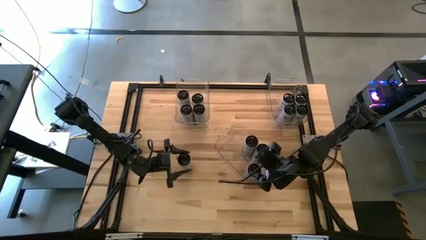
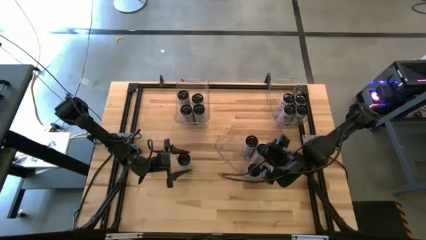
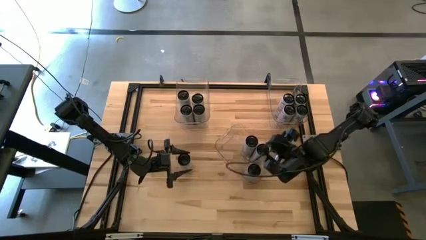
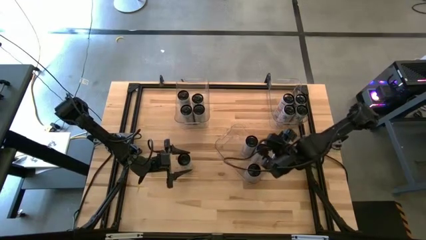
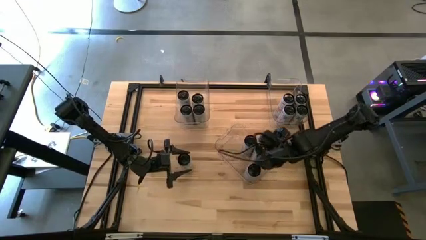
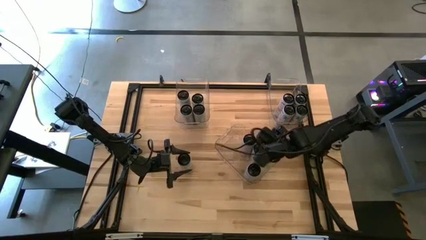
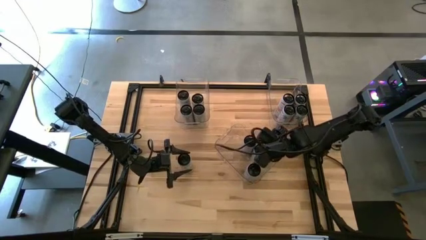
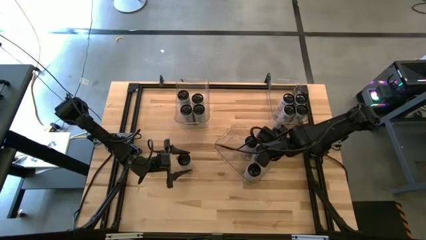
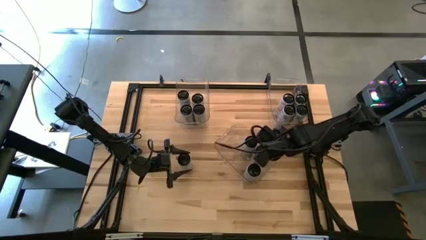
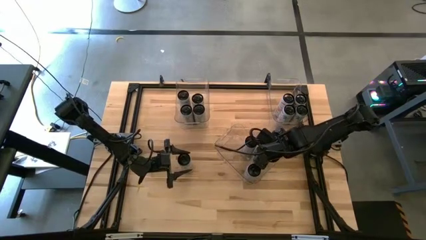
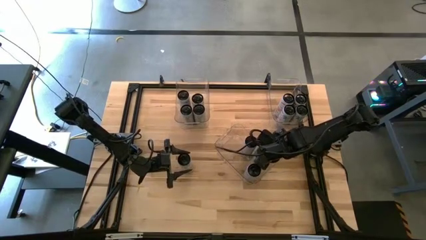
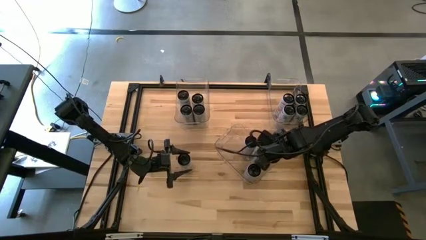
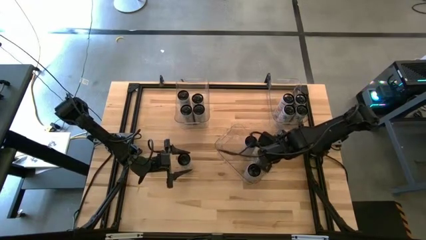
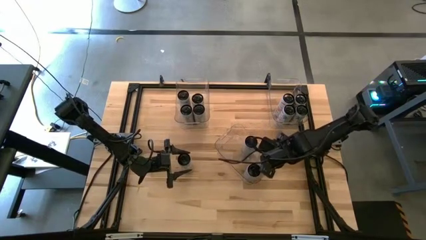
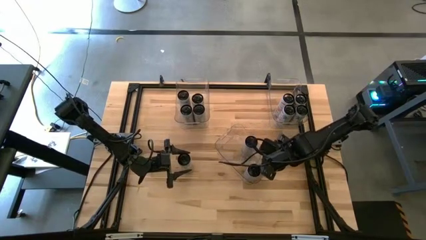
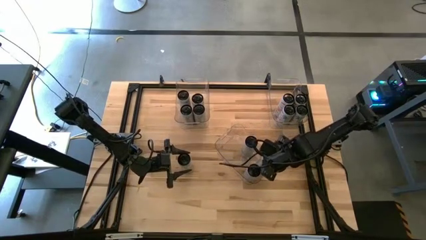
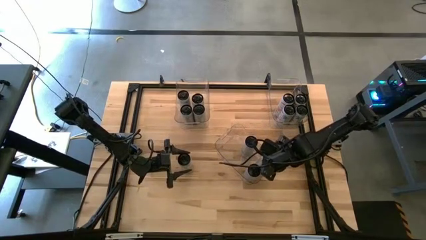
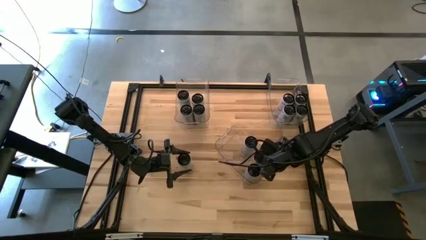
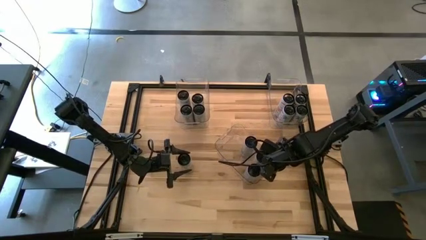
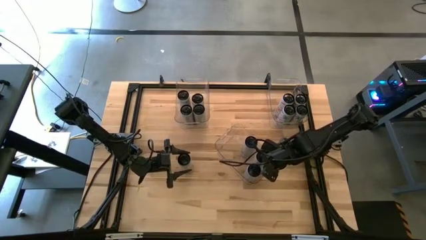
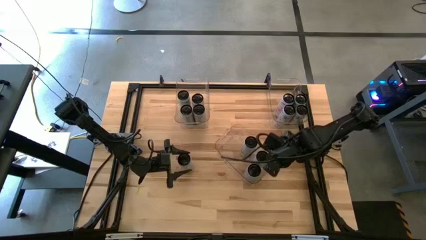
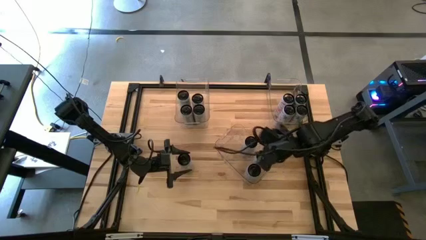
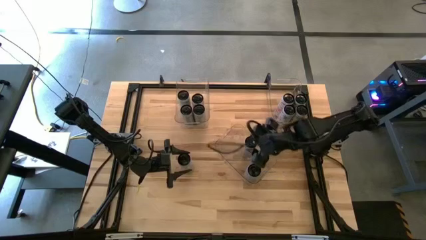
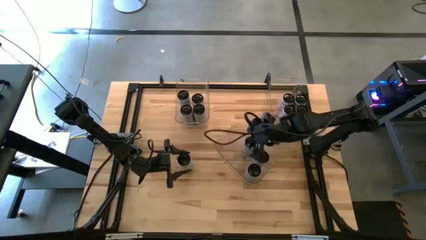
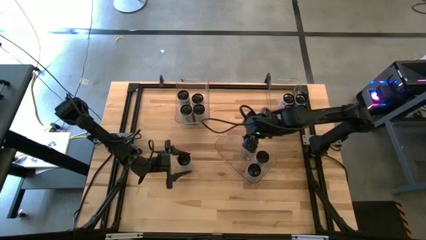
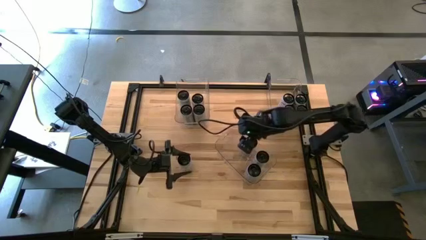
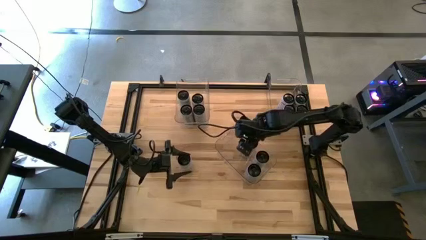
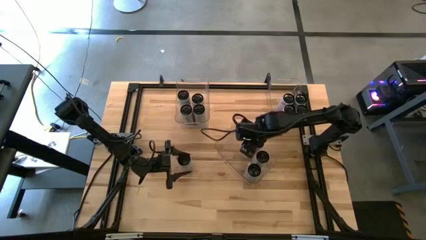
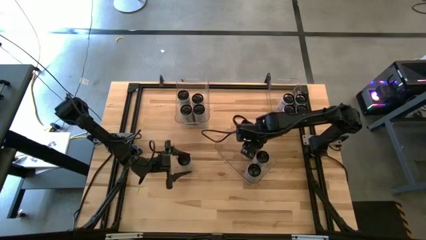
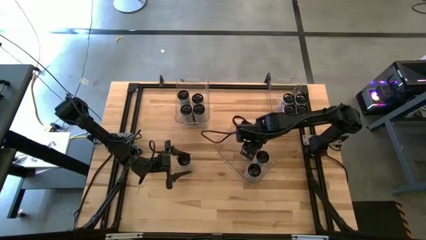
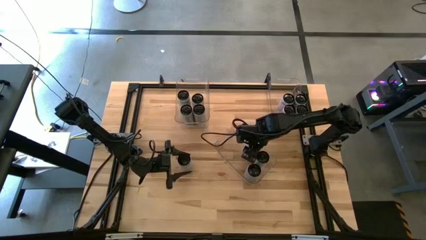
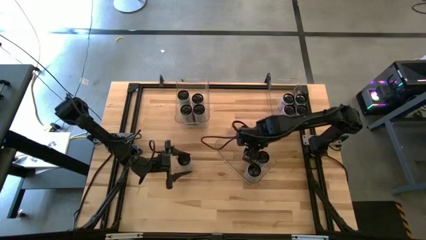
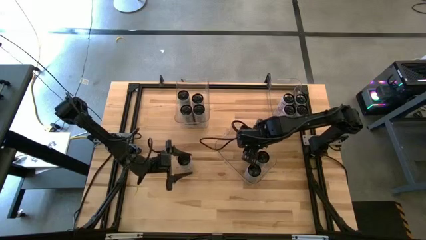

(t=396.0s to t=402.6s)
Task: Sort soda cans
Adjust the blue soda cans

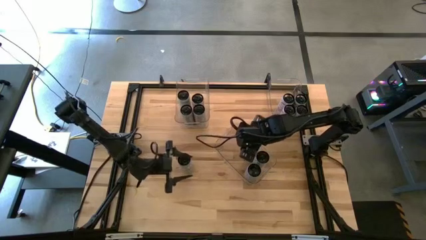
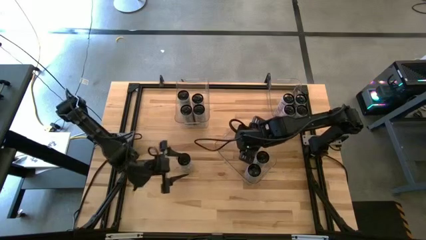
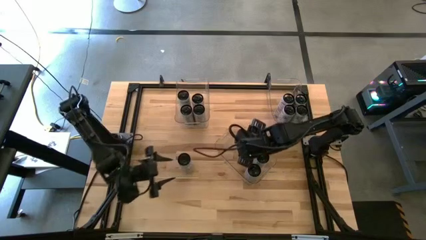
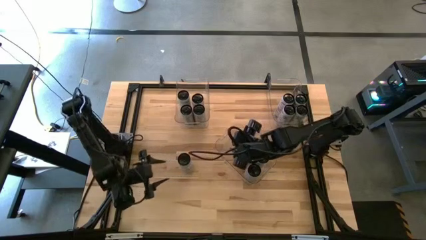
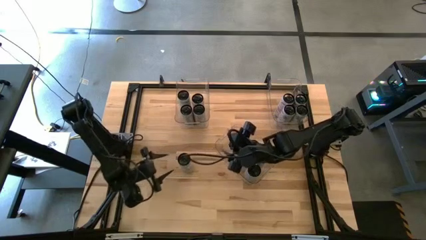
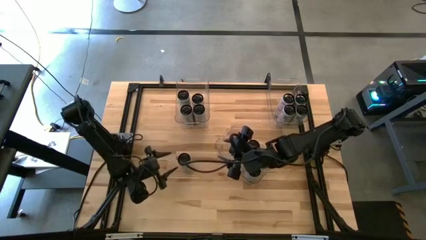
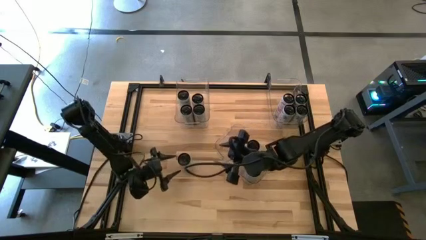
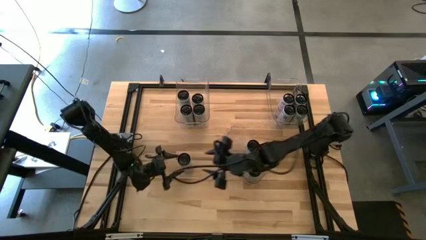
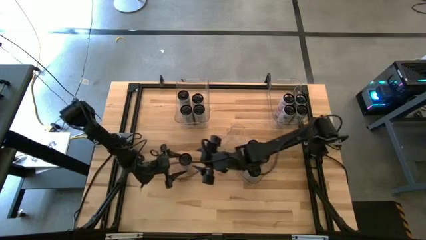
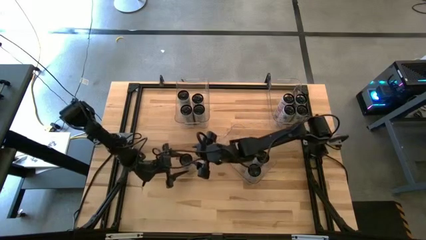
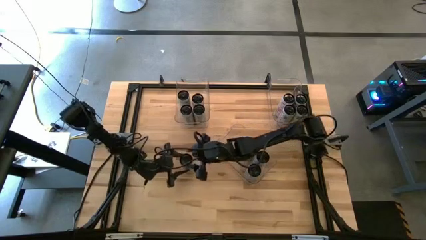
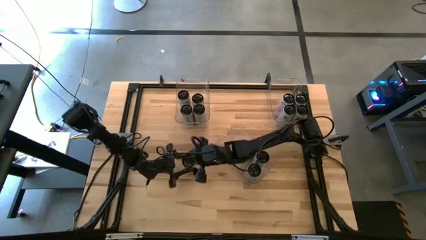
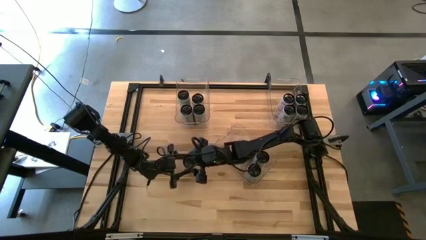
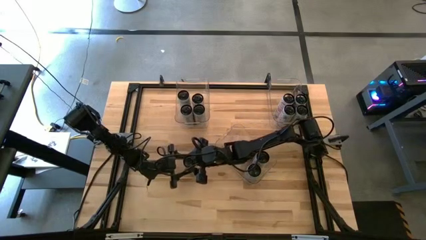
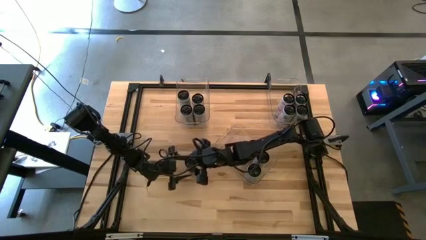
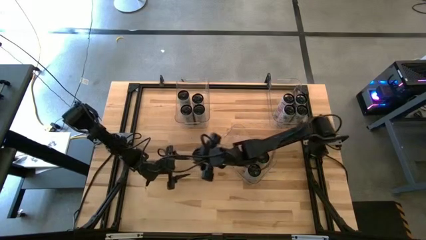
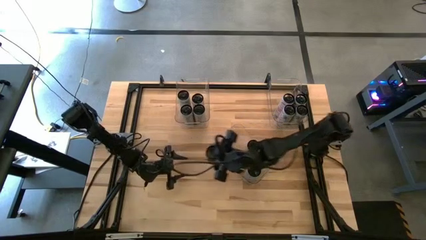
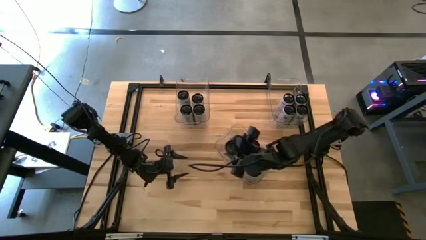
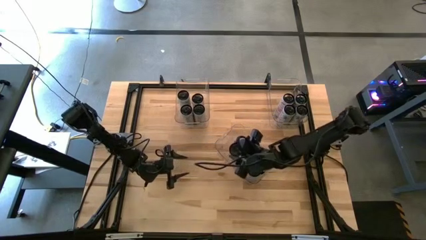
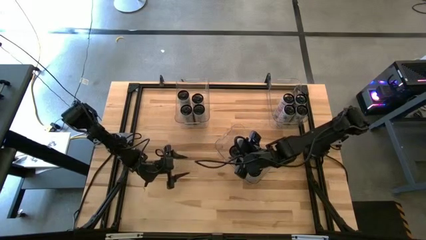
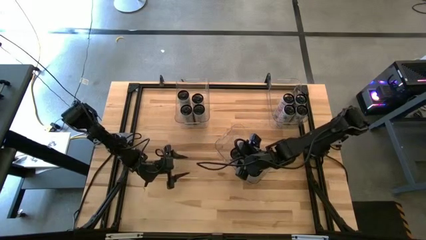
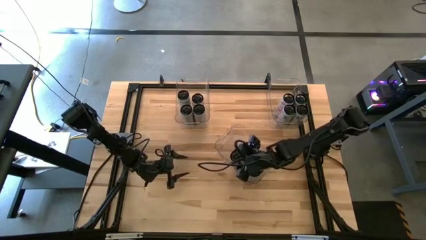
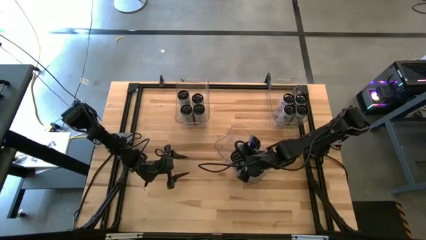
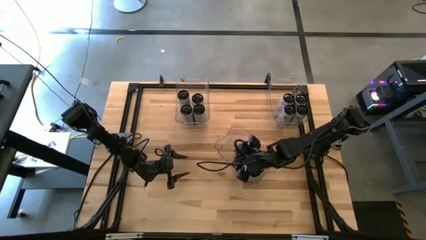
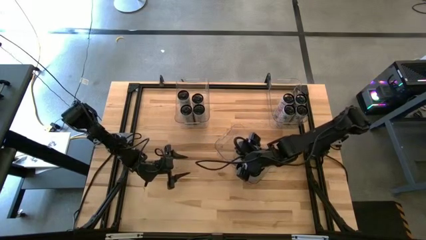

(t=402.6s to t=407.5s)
Put the white/blue soda can into the transparent bin
